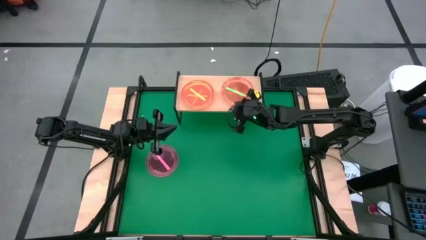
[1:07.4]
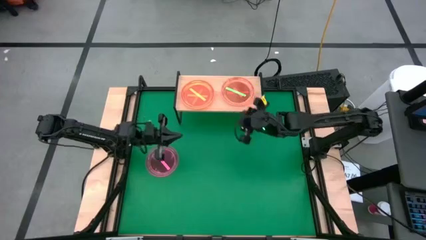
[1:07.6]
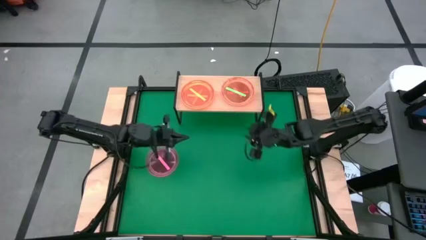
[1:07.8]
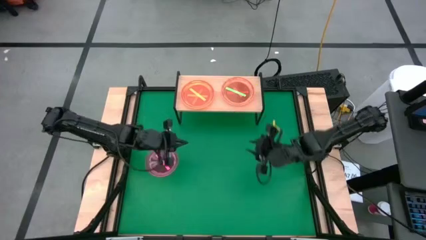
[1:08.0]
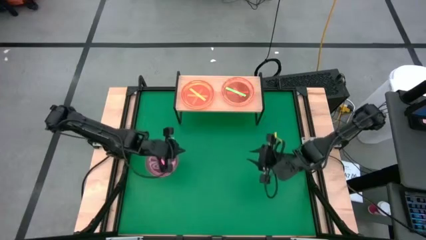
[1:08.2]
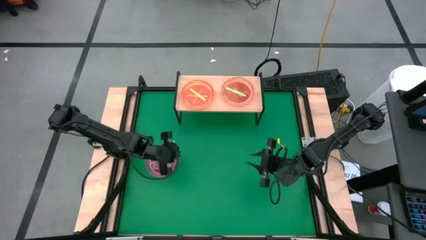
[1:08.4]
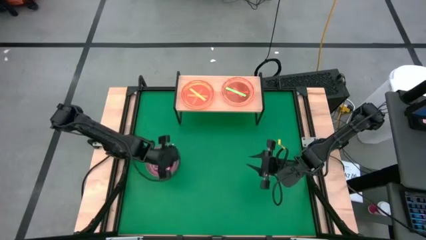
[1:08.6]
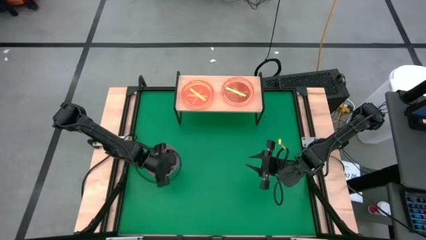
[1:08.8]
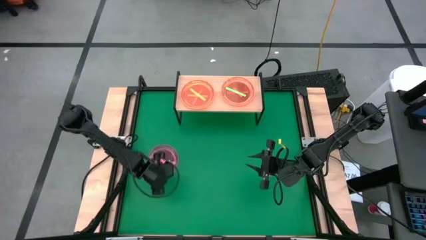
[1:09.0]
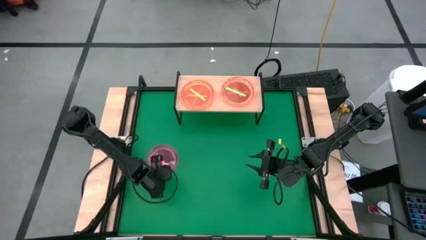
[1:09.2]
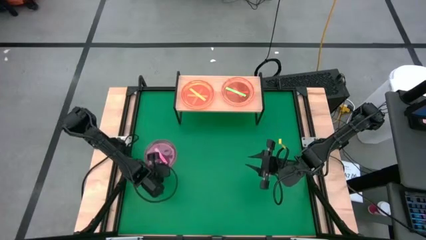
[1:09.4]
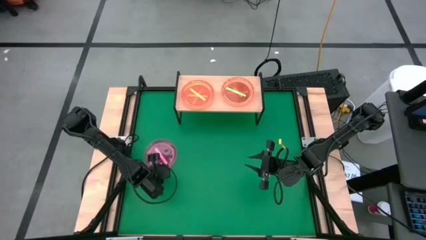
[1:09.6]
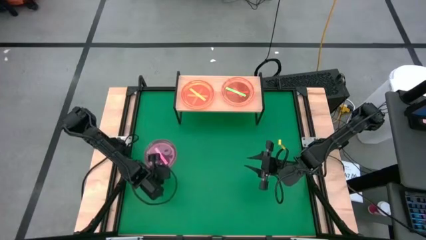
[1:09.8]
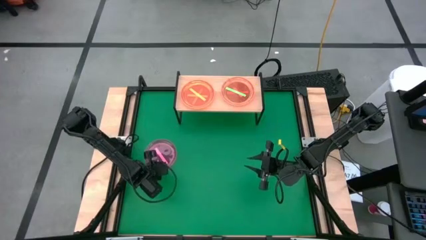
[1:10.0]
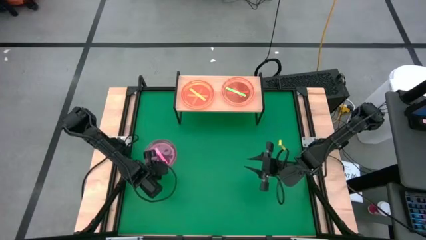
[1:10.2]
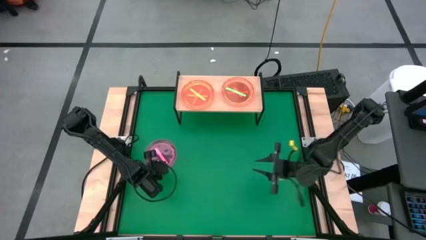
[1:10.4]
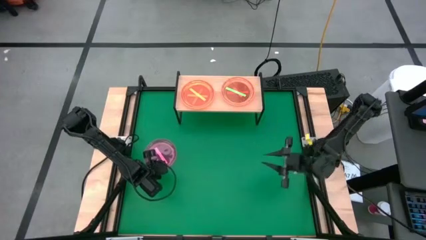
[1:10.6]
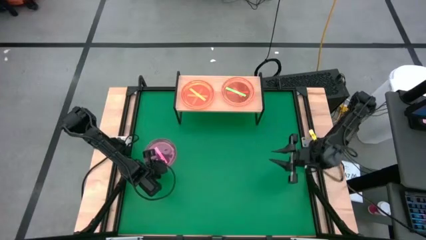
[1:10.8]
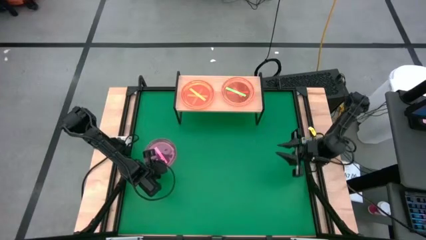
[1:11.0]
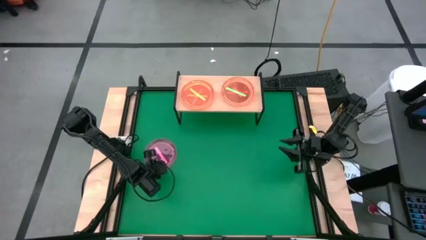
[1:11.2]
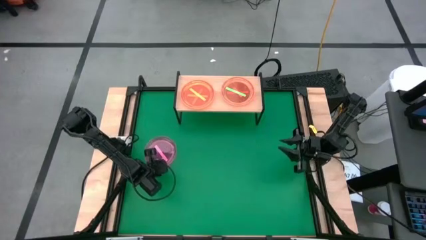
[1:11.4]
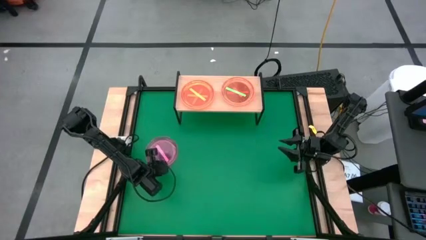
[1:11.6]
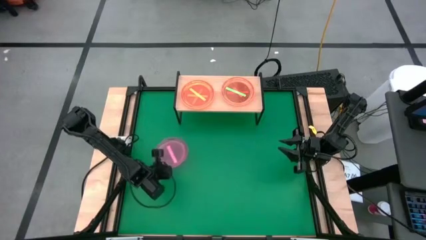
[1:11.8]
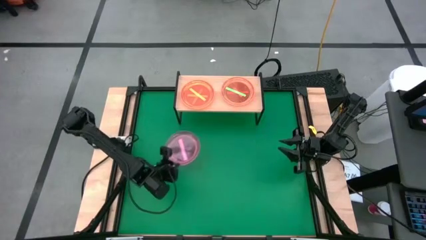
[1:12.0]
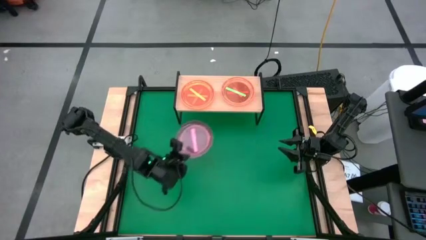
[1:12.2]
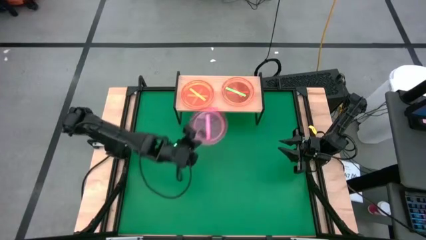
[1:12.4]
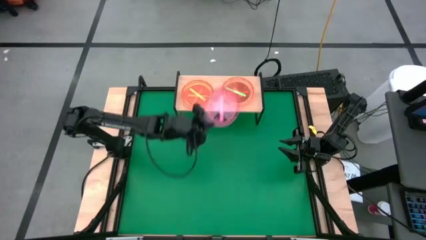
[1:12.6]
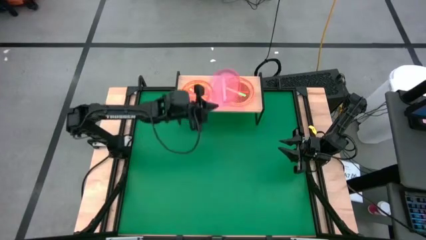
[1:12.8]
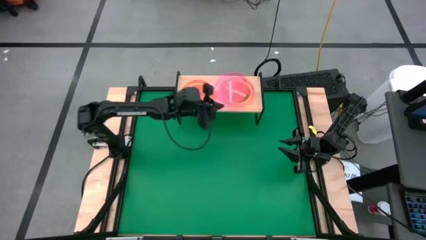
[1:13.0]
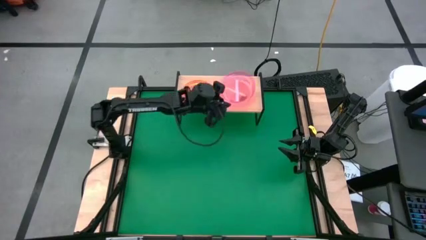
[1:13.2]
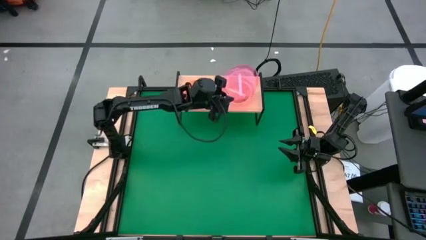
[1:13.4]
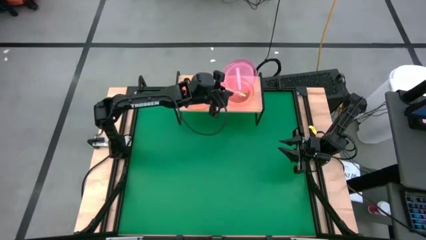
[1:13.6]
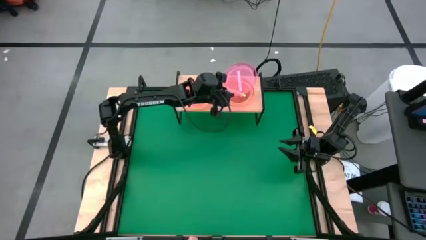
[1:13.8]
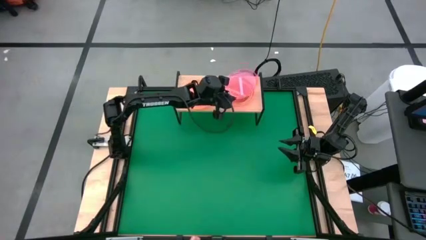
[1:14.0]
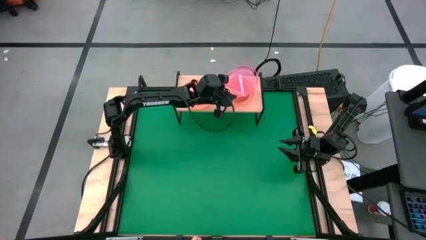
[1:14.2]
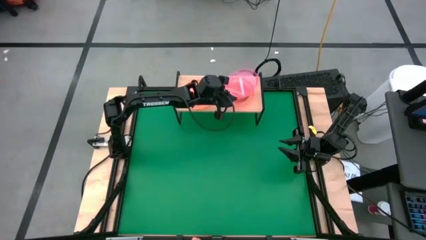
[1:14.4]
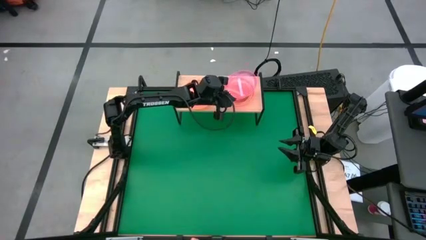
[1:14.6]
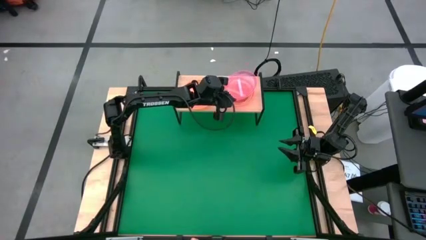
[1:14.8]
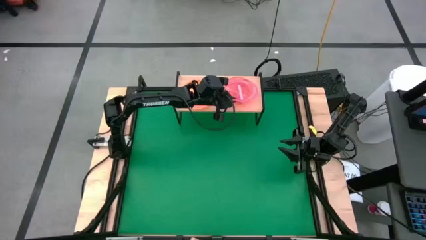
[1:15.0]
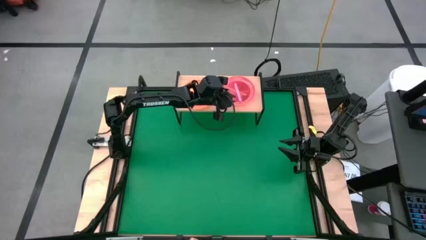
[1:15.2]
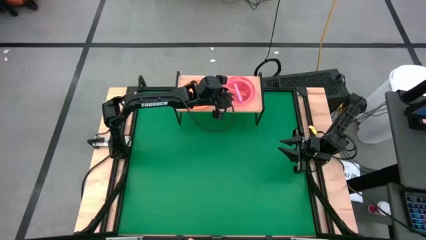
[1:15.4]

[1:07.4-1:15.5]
Task: Place and stack plates onto a shelf
Stack the pink plate on the green plate on the shelf

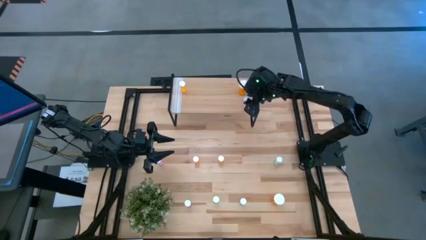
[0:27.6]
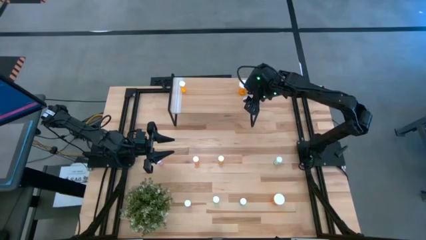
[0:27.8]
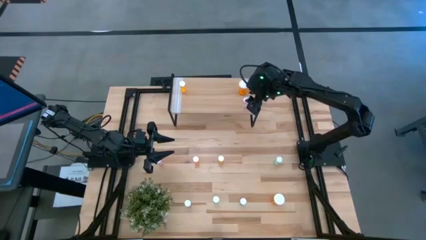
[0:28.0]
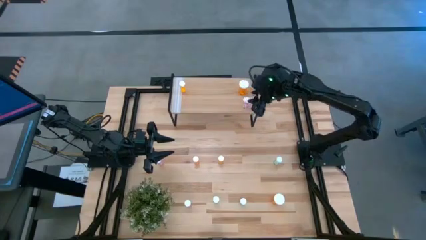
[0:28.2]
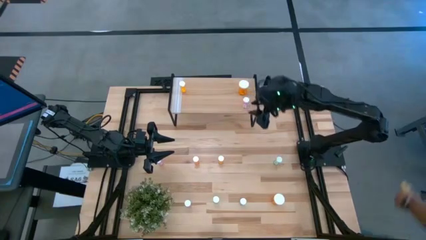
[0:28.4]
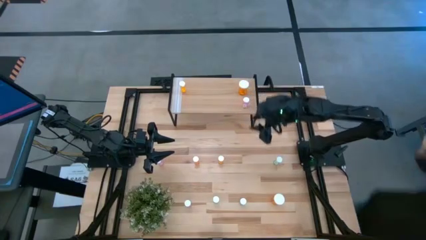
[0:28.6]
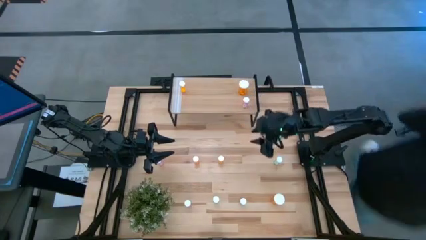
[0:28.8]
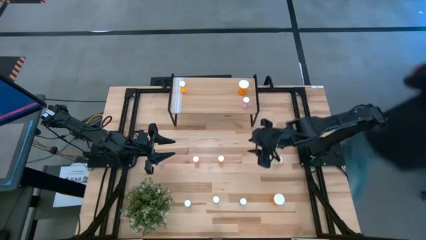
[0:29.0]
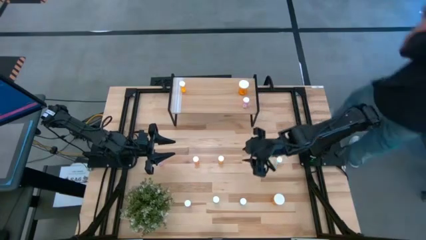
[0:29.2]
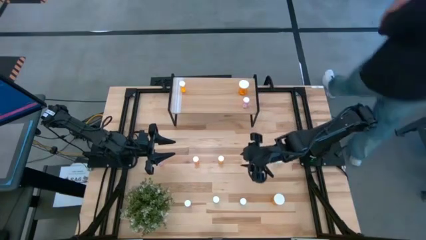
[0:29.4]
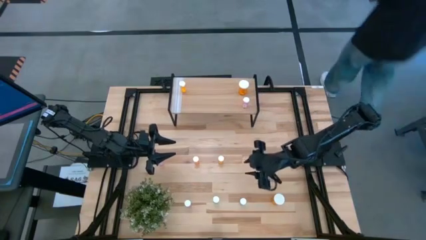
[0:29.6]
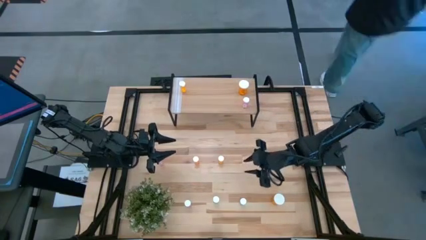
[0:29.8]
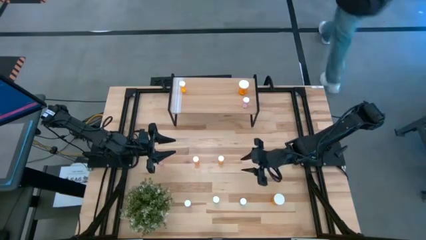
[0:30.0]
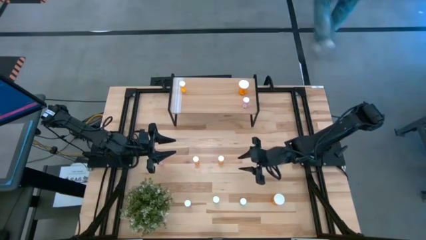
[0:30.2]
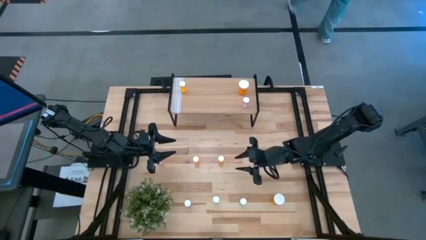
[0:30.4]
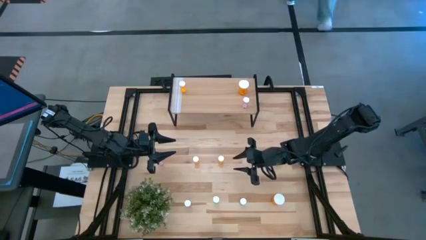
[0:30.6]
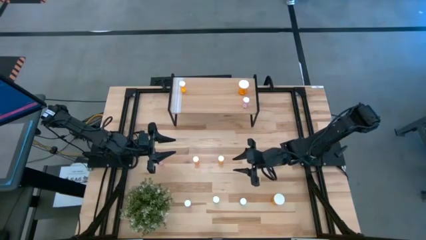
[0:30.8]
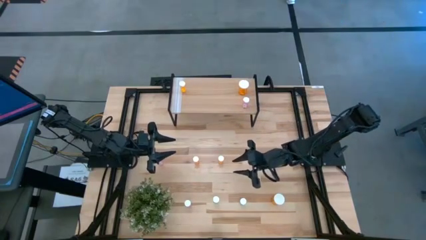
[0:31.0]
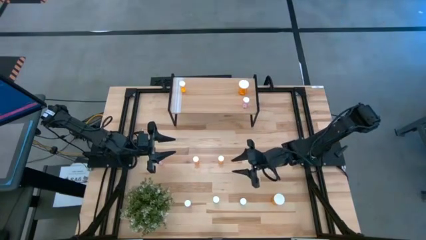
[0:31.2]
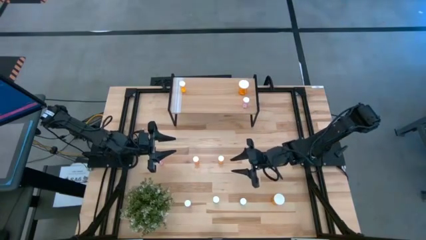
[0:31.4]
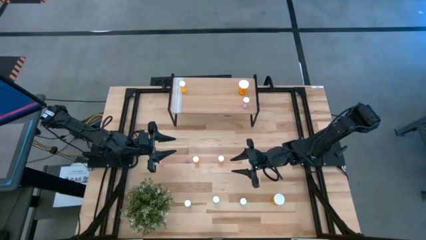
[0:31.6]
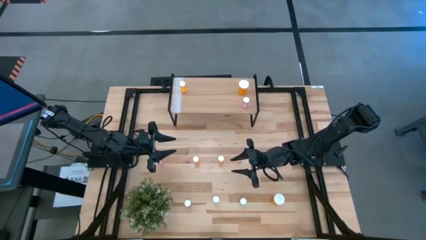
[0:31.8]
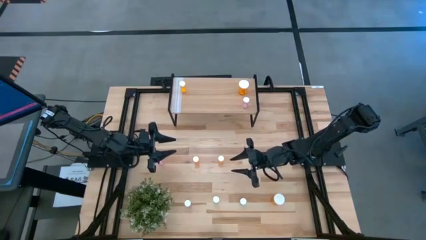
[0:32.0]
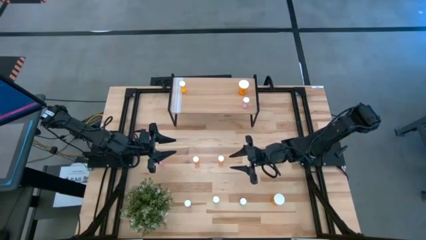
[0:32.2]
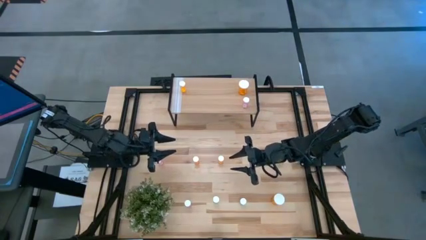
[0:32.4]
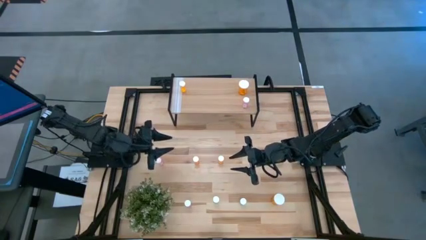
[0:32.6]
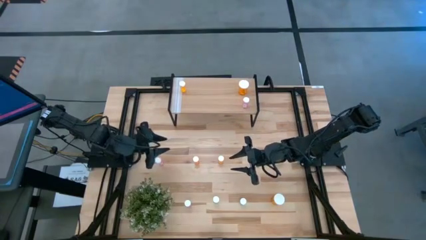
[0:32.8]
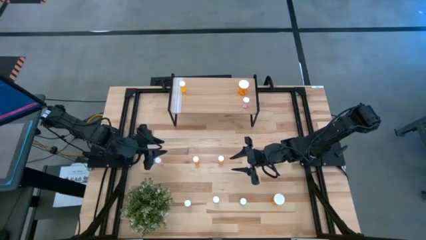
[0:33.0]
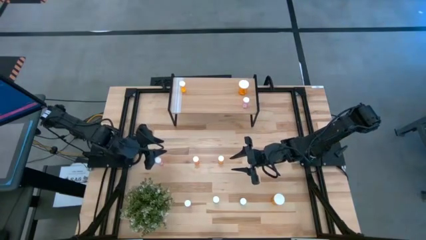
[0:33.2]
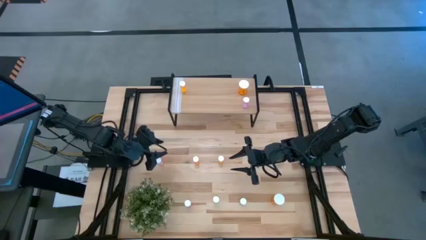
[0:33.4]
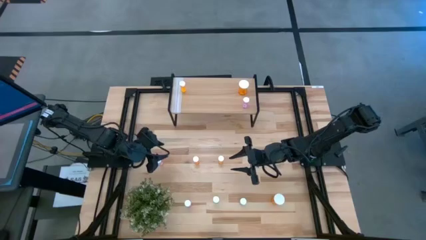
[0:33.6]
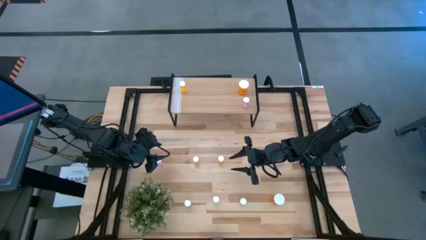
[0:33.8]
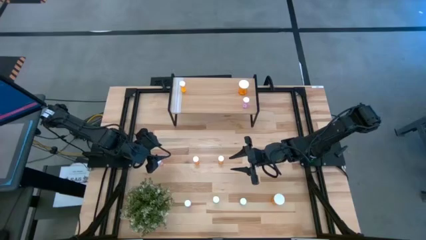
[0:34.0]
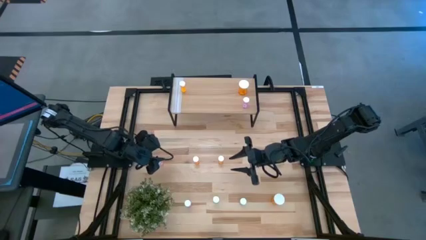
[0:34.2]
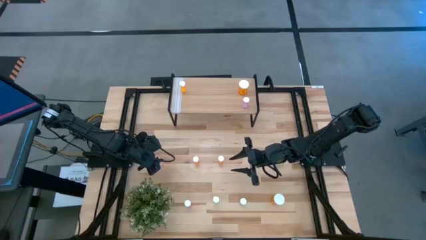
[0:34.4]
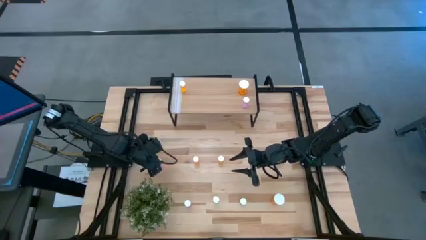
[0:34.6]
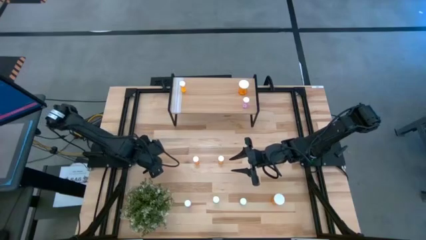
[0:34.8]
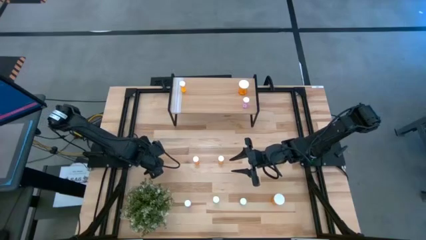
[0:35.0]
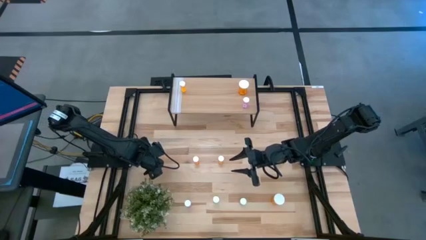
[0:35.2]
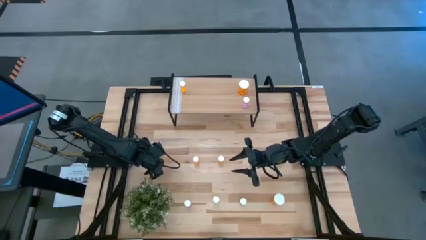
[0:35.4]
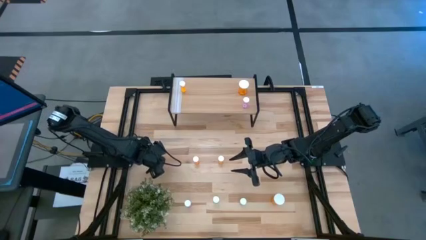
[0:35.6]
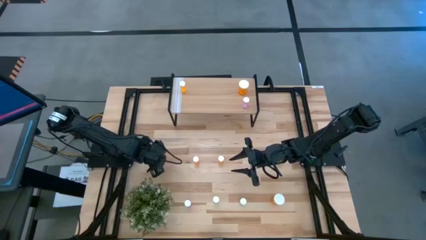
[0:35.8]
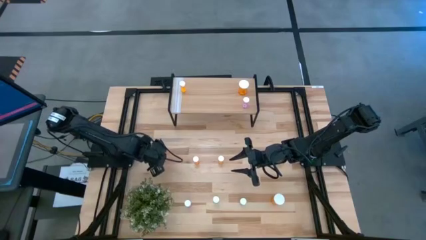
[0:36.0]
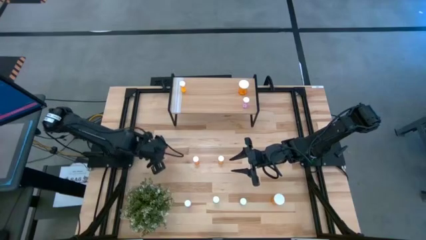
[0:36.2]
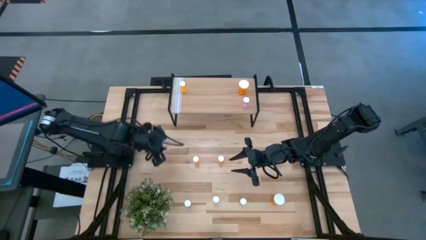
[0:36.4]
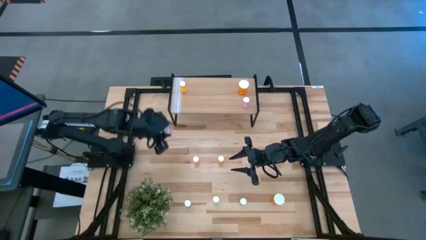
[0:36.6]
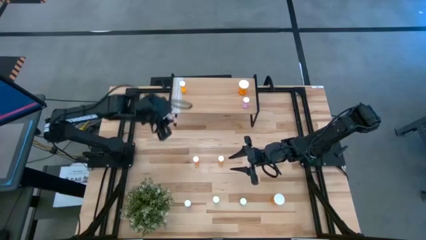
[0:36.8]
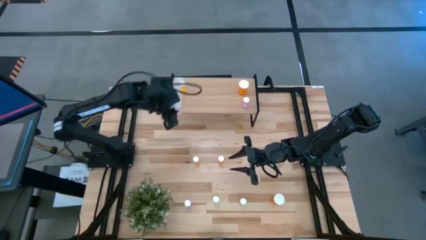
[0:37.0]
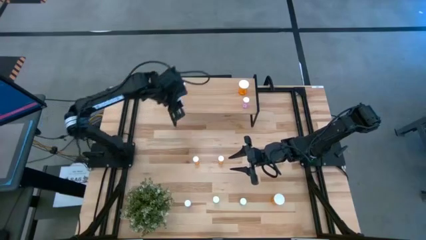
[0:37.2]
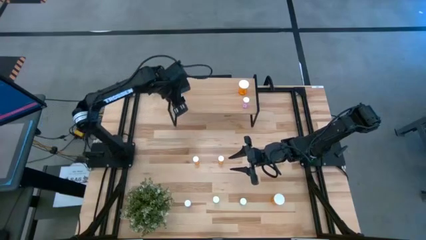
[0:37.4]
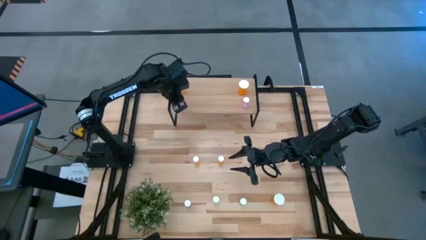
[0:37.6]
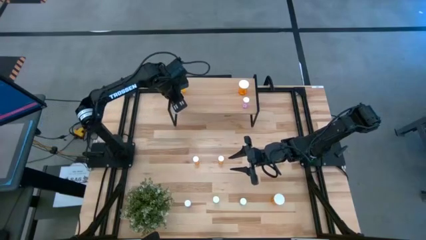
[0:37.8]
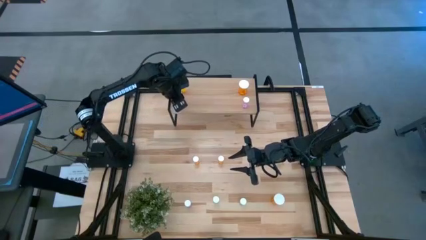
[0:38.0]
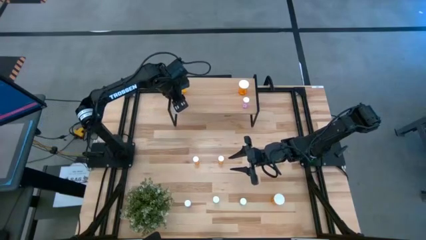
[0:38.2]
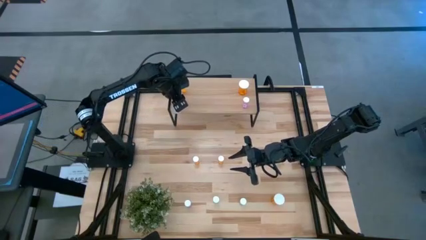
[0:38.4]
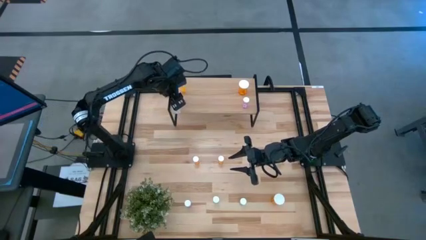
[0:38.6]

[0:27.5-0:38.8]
Task: Pick and place medicine bottles onto shelf by color
Put the top small pink pill bottle on the shelf
